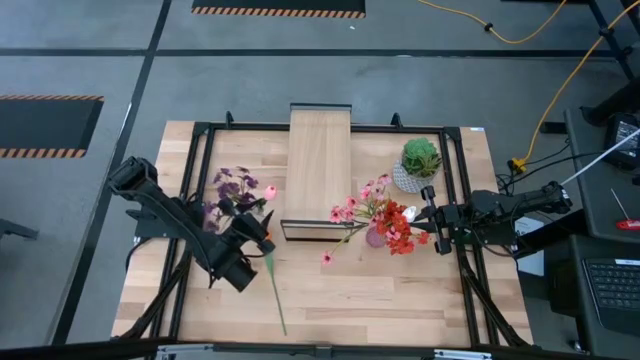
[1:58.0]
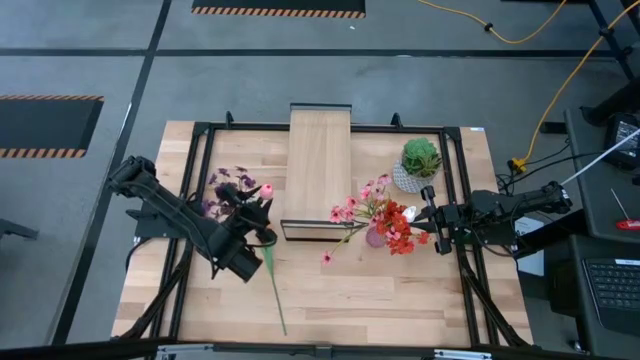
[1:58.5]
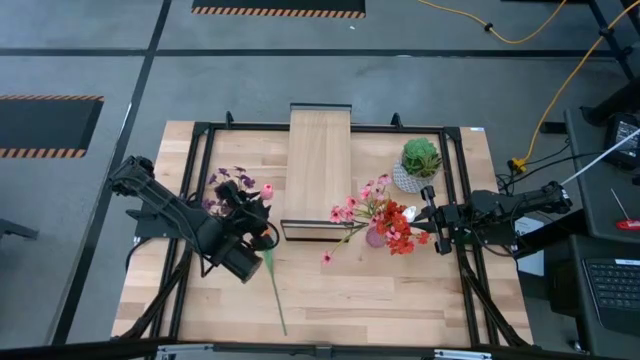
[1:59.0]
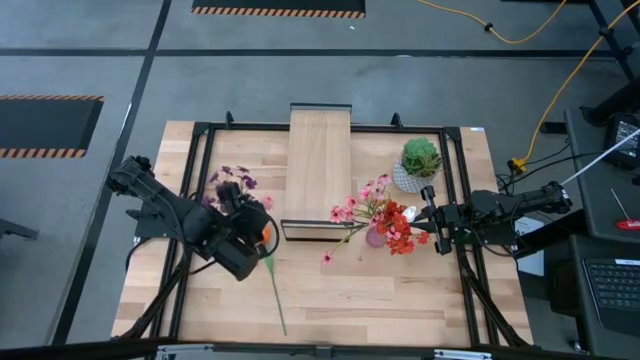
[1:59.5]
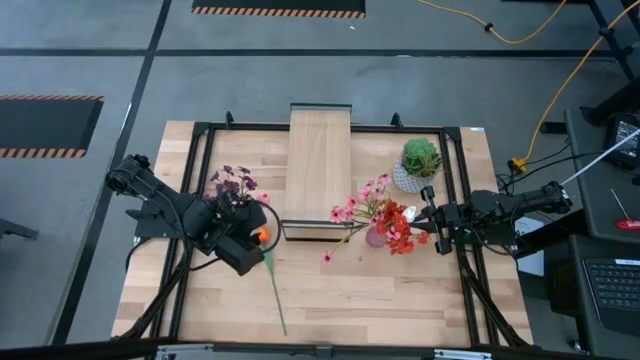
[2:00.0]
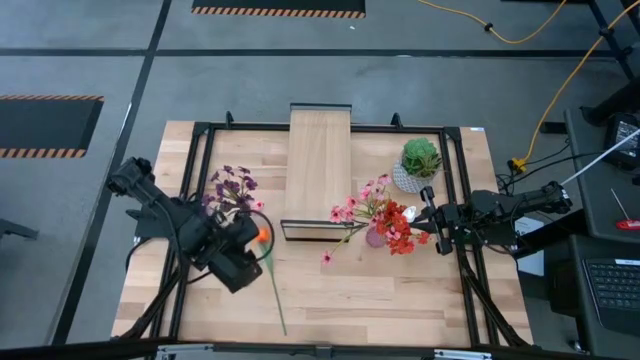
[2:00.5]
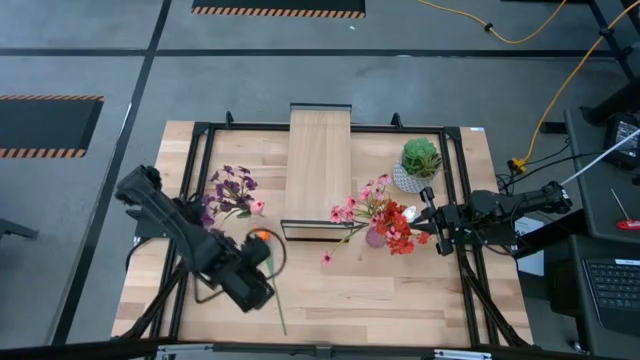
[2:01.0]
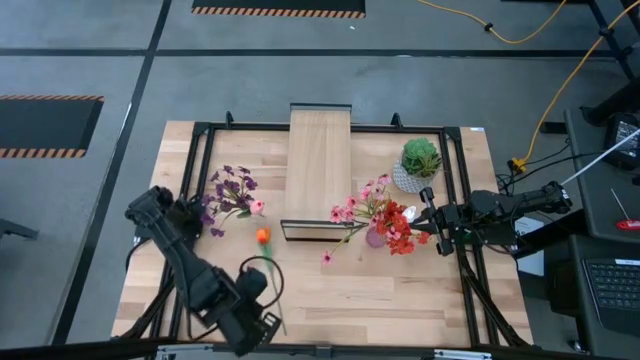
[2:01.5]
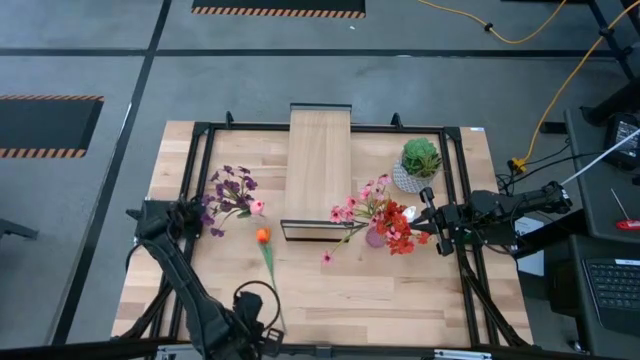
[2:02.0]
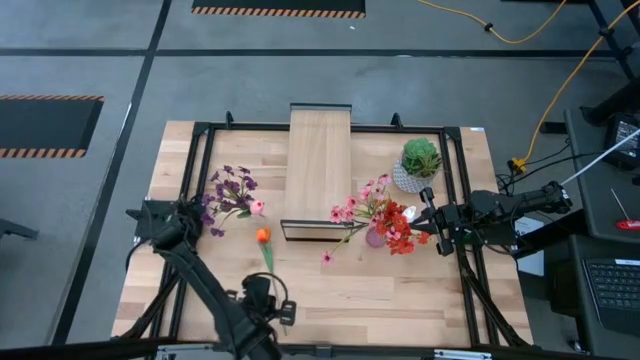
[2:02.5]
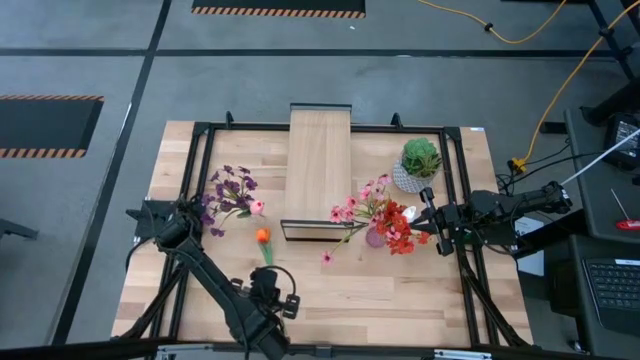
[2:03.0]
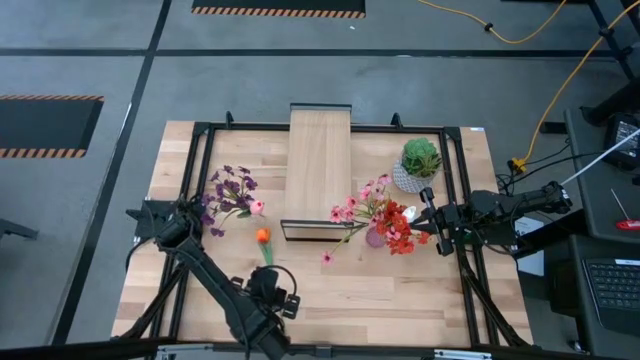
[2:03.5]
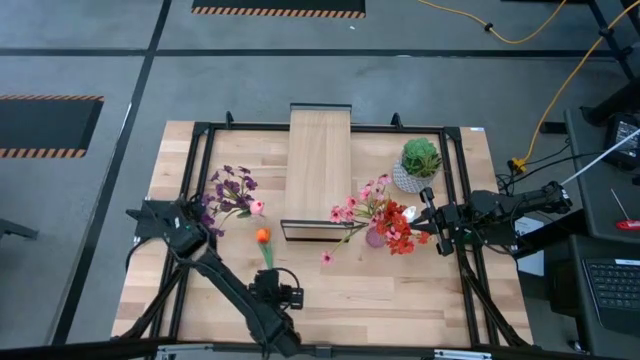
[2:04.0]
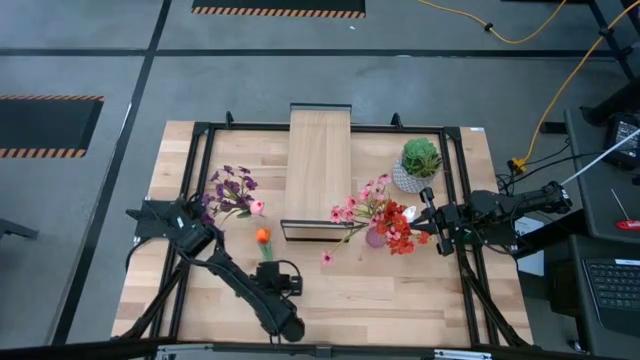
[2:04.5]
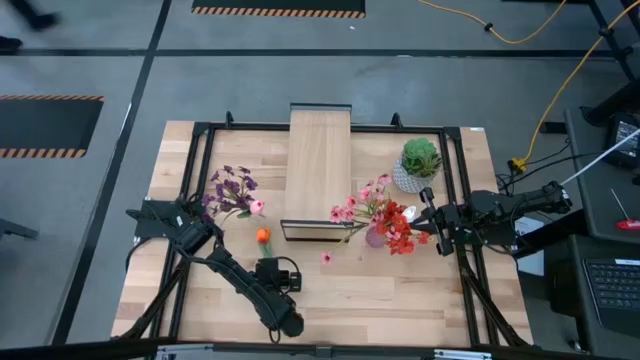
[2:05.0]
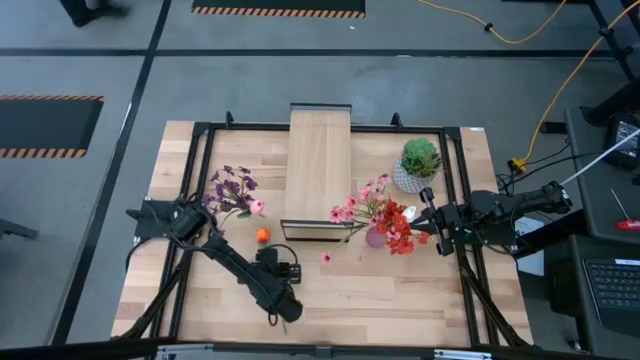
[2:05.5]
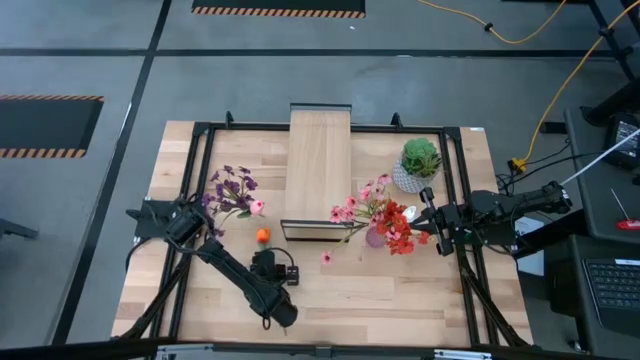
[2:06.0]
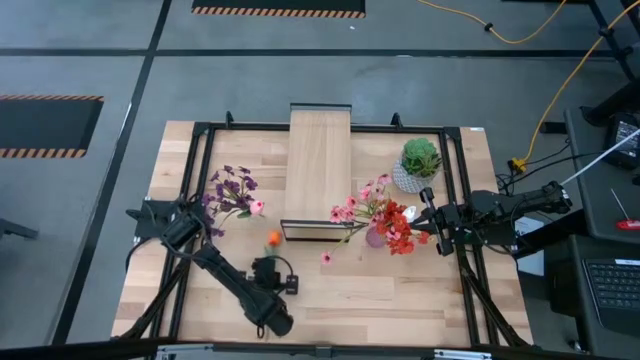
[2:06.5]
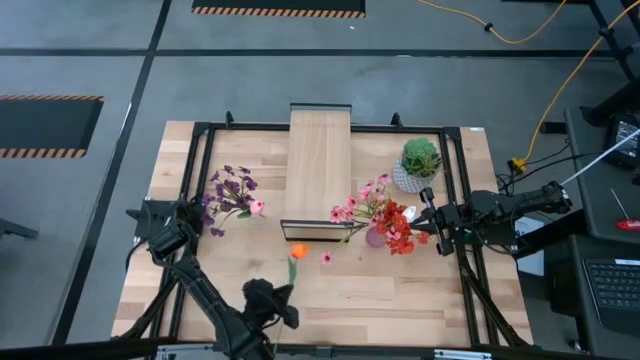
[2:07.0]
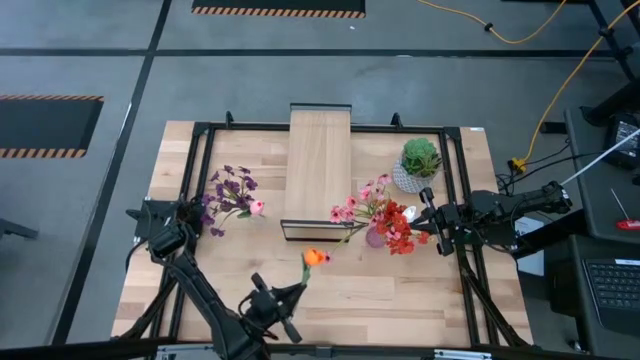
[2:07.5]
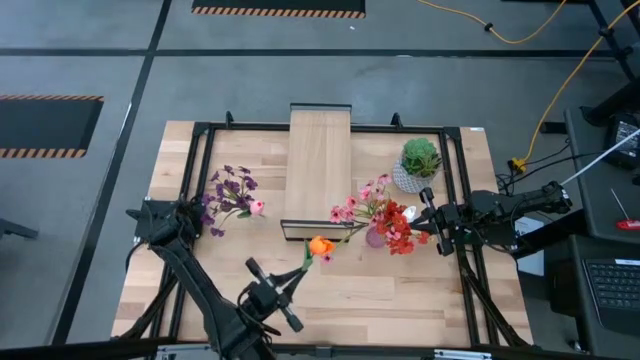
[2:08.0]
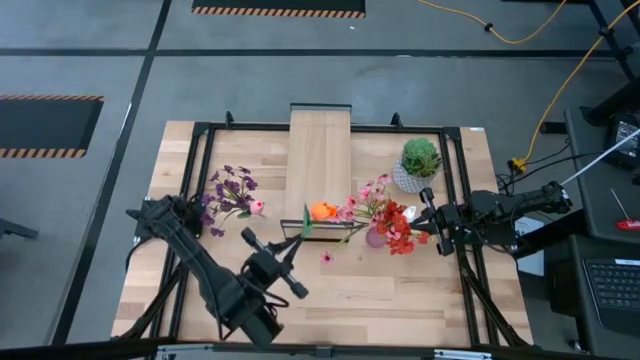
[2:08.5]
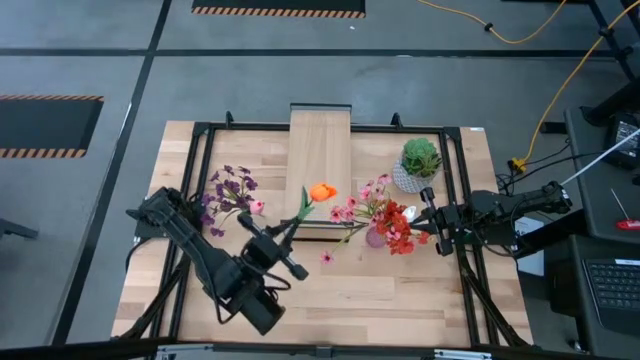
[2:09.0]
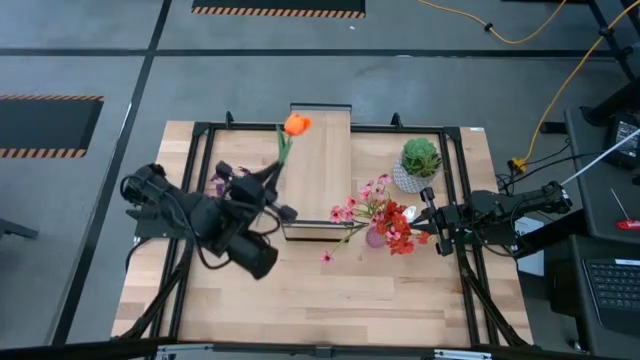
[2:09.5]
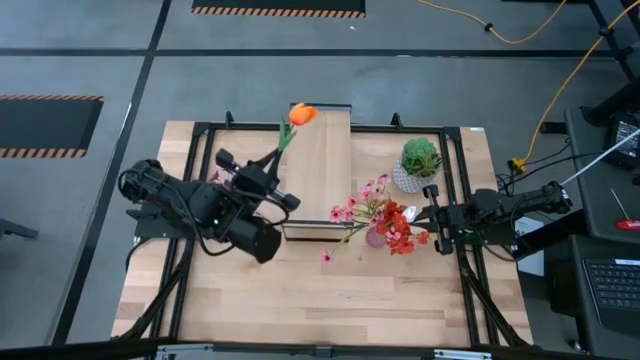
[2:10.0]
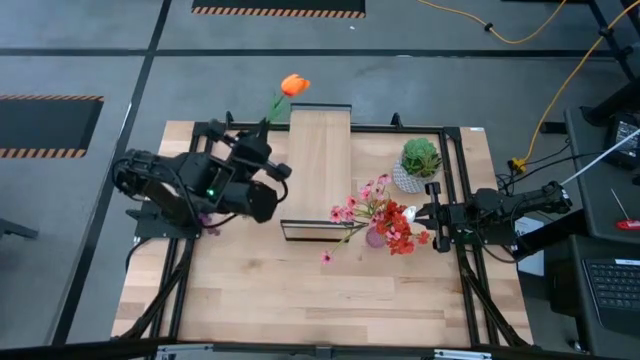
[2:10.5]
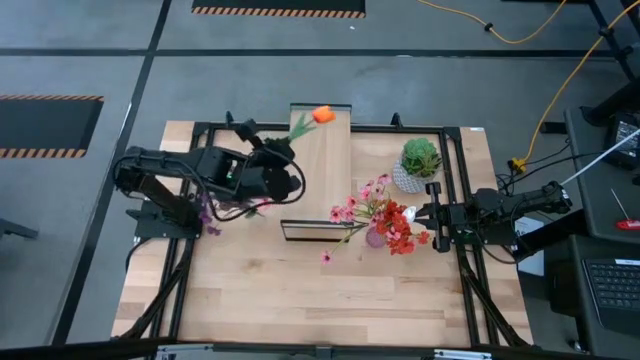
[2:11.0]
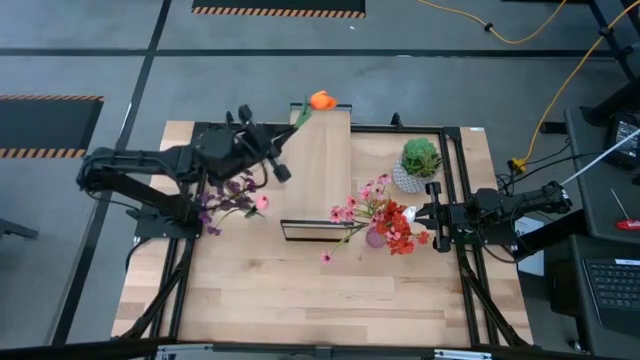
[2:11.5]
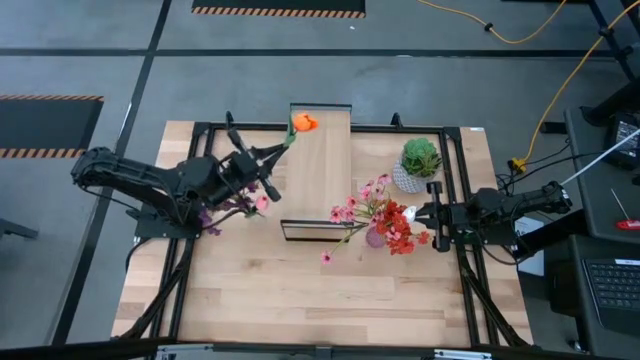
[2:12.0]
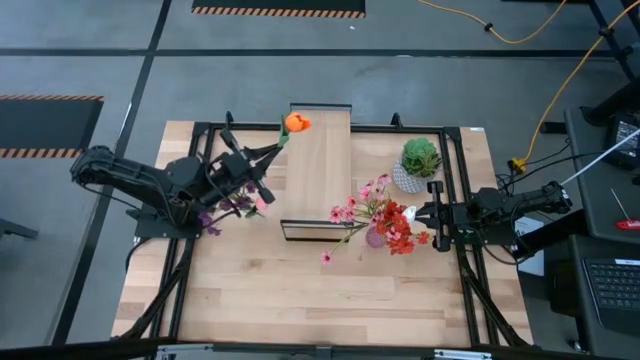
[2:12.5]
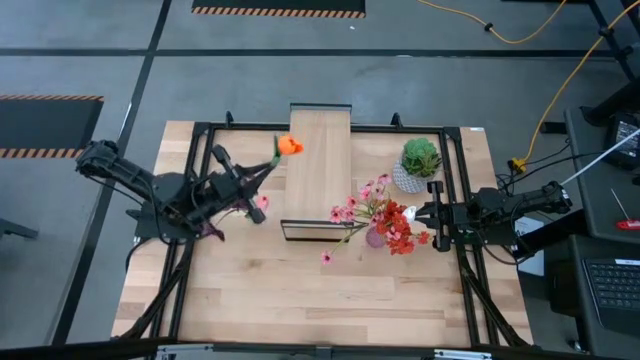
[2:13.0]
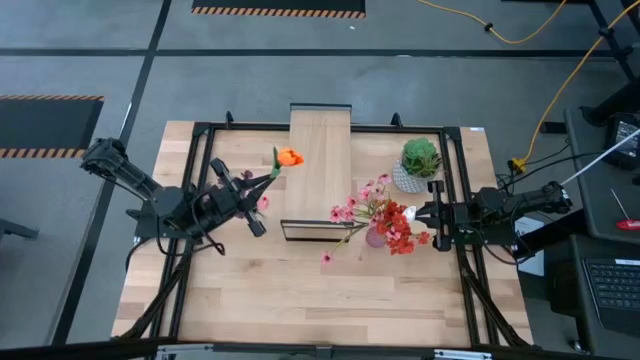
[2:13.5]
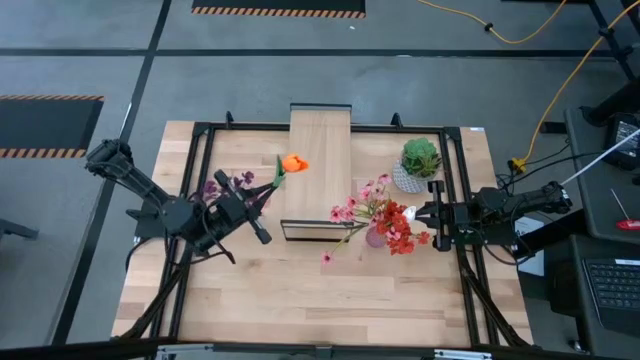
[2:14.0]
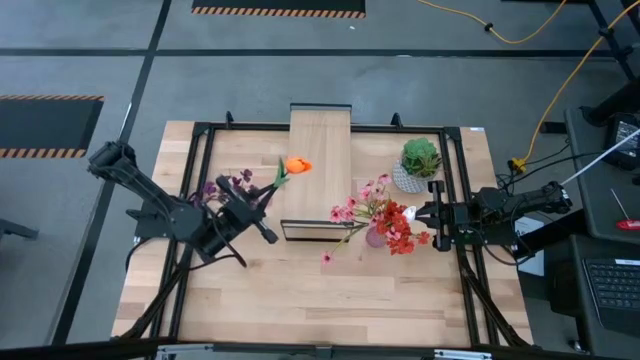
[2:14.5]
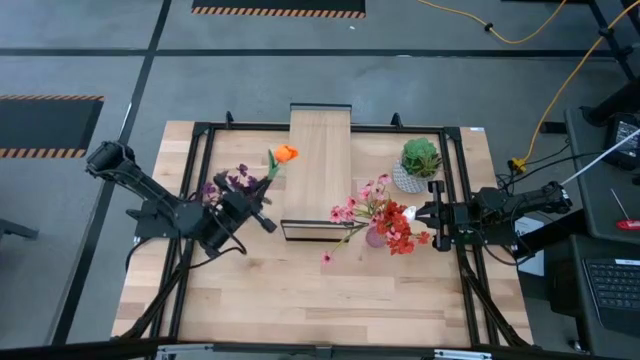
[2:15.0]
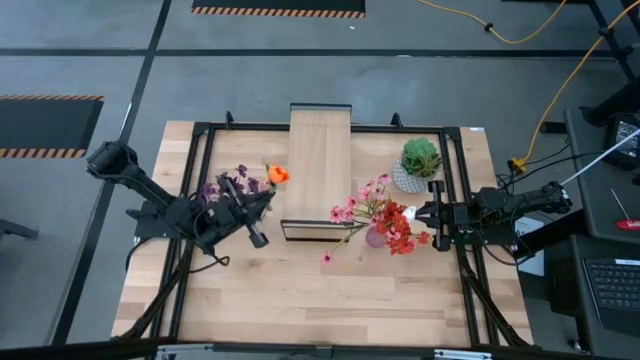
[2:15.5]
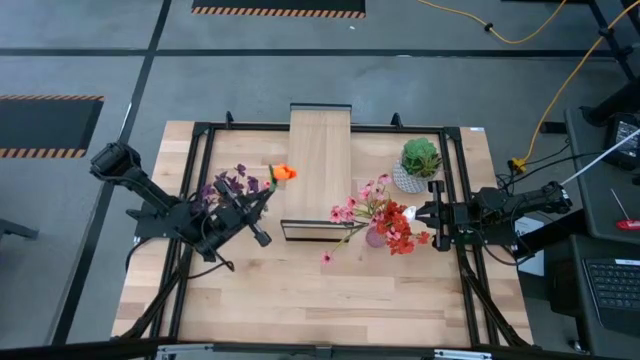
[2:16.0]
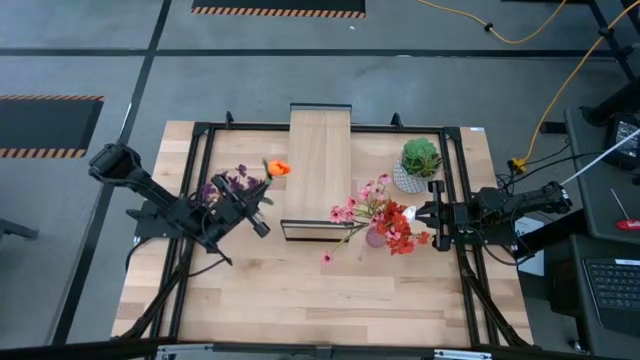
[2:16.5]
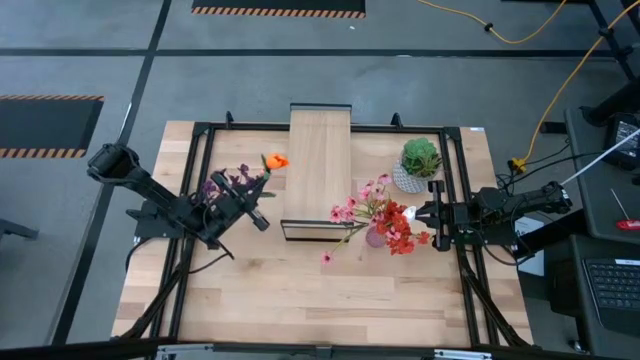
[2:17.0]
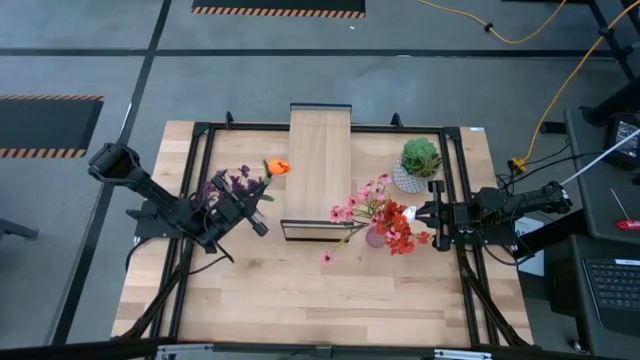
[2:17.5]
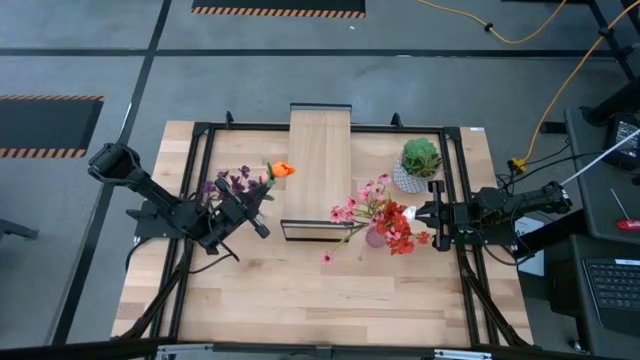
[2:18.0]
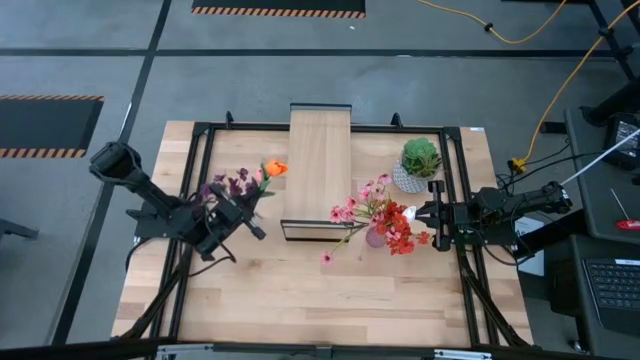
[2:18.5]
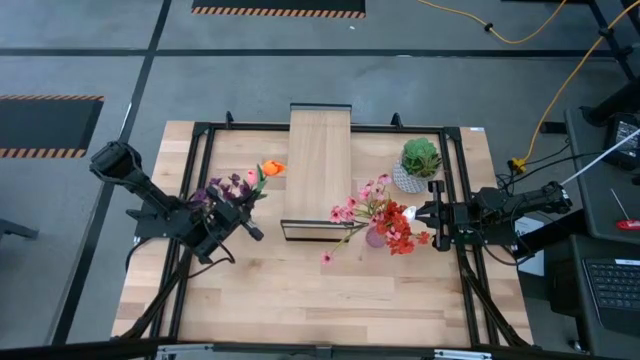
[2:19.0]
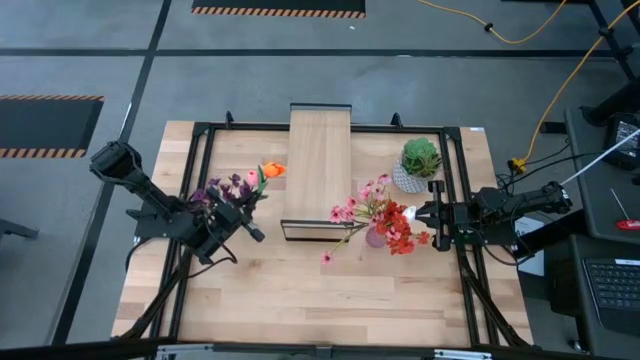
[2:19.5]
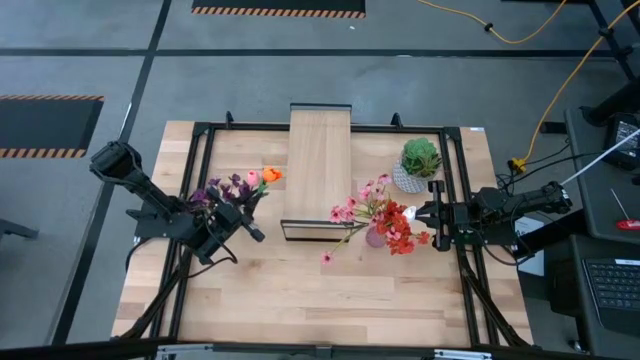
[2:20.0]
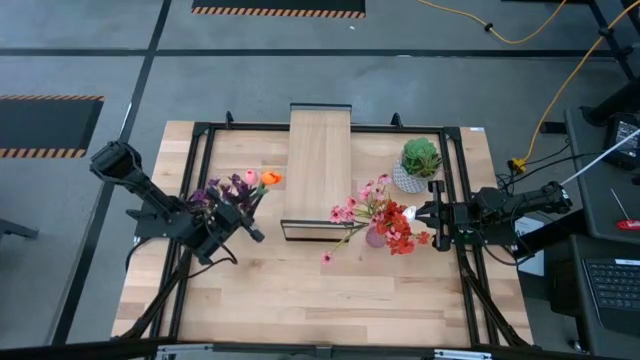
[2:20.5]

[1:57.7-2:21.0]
Task: Pick and place flowers into a vace then onto a shelf
Put the orange tulip into the transparent vase
